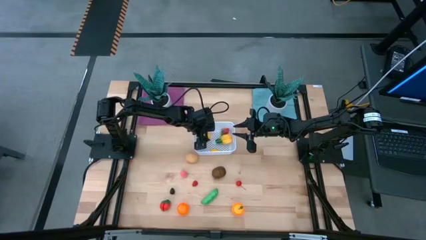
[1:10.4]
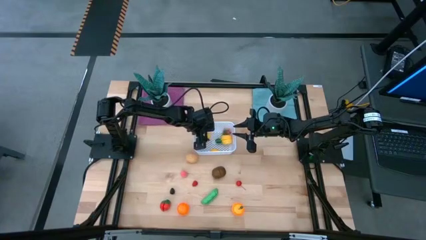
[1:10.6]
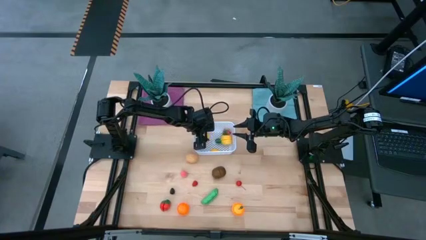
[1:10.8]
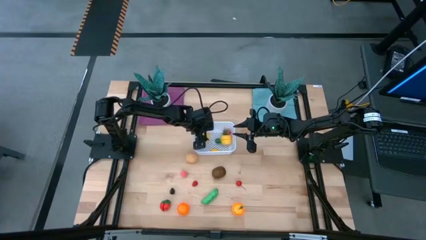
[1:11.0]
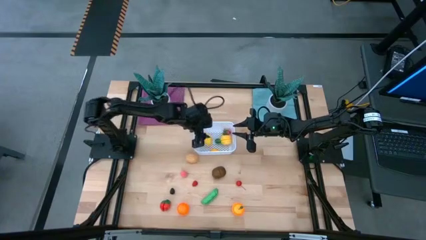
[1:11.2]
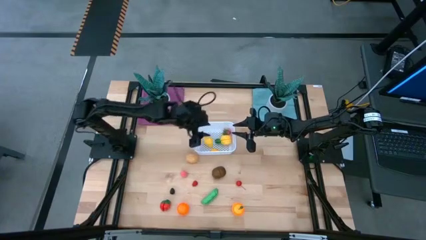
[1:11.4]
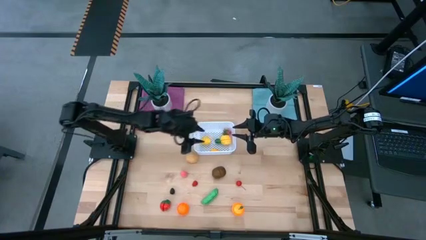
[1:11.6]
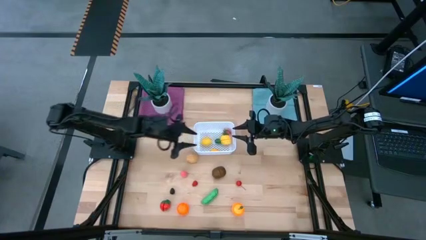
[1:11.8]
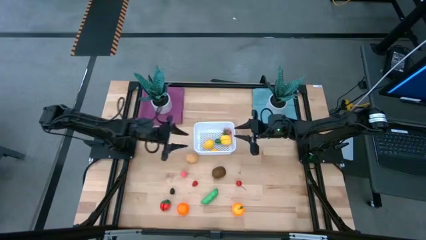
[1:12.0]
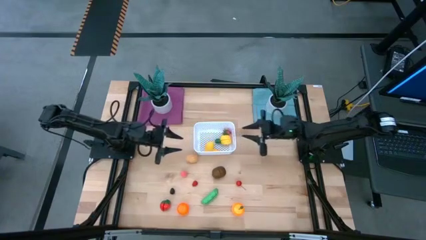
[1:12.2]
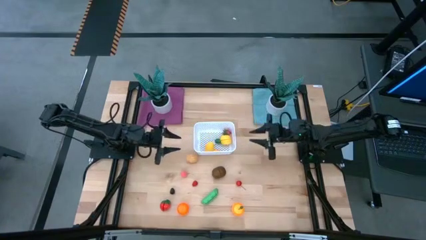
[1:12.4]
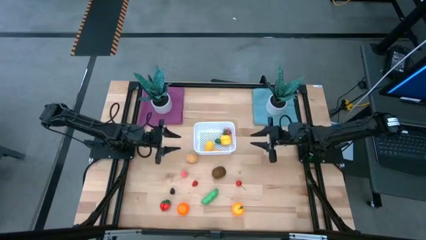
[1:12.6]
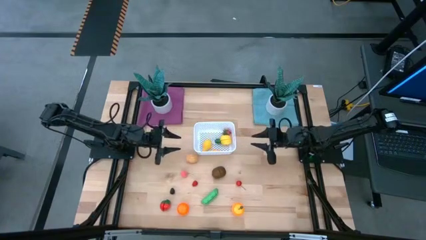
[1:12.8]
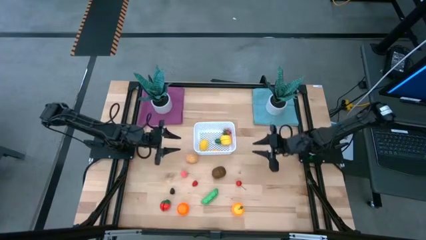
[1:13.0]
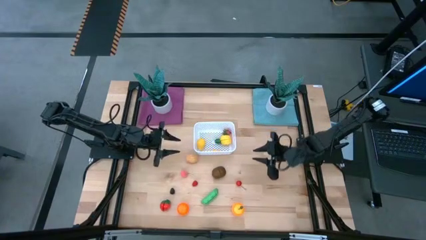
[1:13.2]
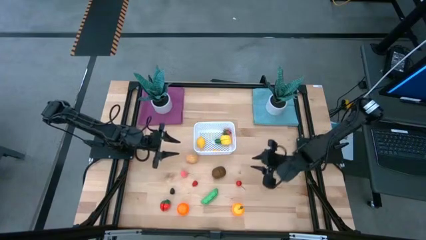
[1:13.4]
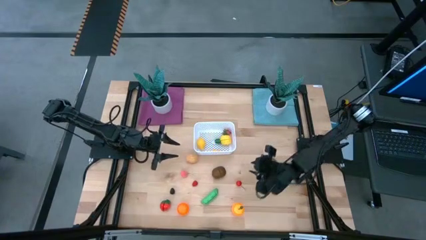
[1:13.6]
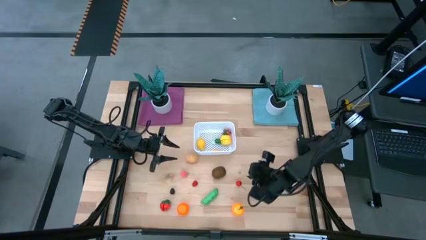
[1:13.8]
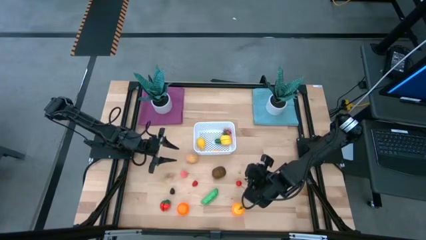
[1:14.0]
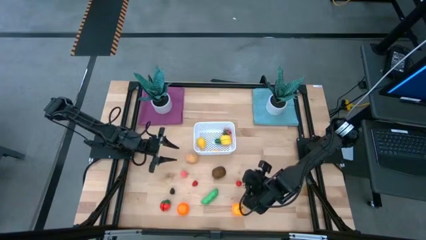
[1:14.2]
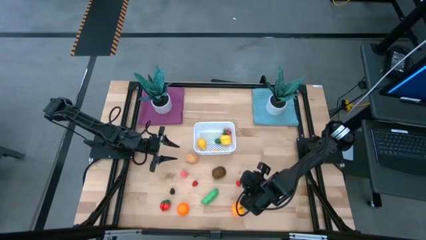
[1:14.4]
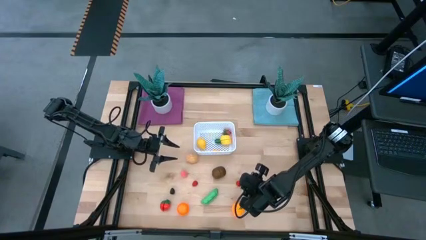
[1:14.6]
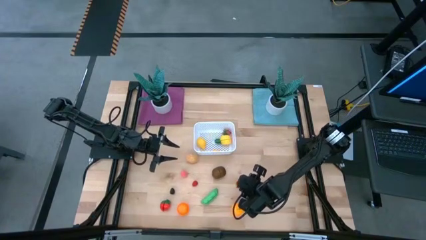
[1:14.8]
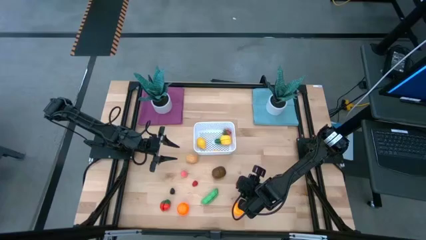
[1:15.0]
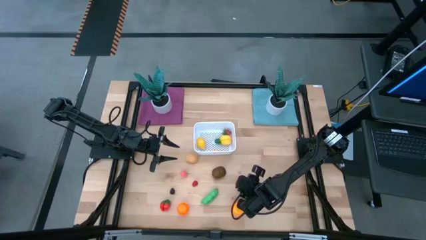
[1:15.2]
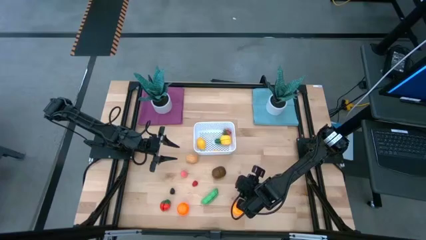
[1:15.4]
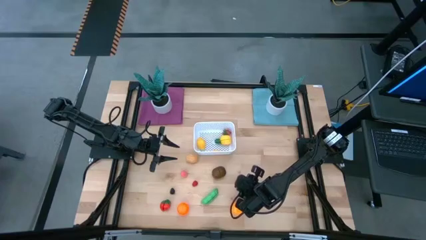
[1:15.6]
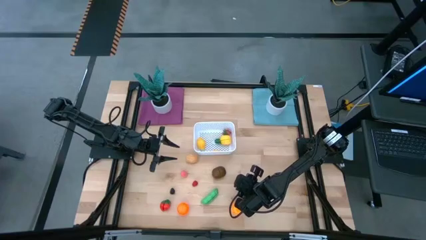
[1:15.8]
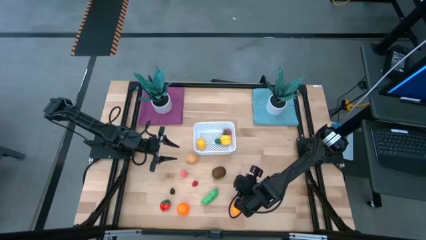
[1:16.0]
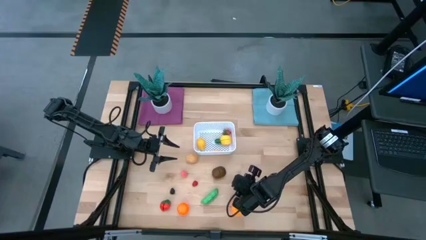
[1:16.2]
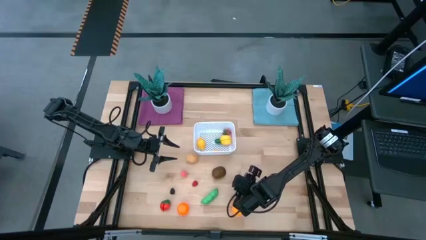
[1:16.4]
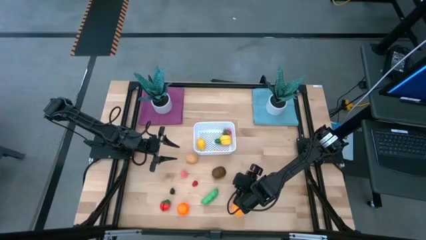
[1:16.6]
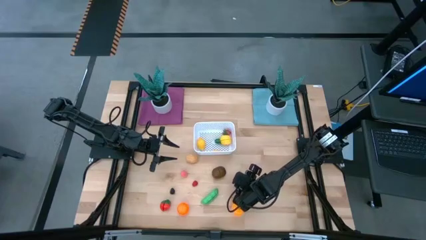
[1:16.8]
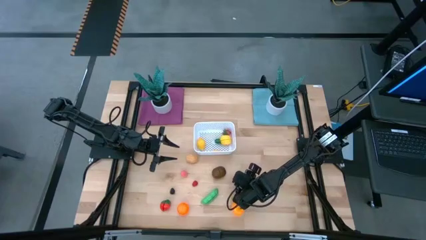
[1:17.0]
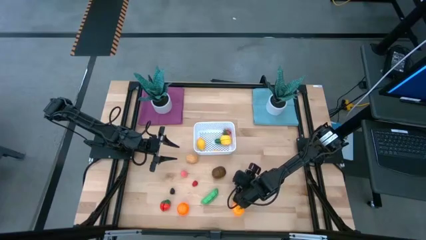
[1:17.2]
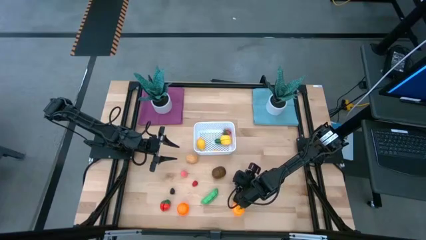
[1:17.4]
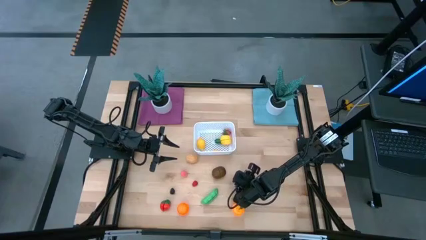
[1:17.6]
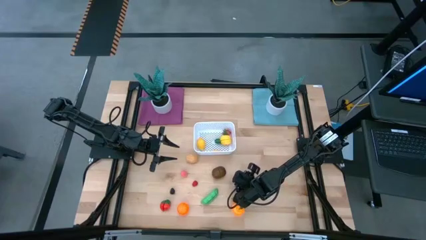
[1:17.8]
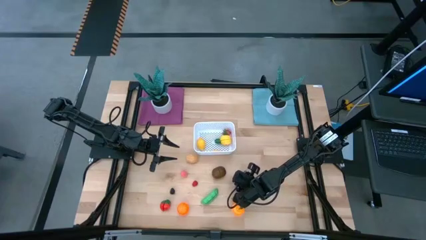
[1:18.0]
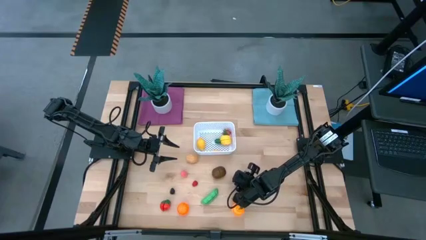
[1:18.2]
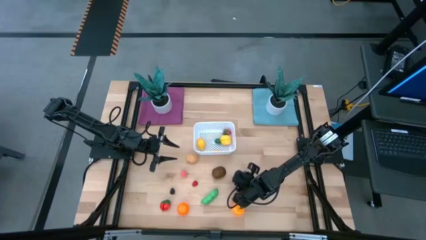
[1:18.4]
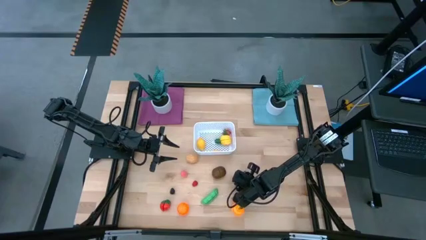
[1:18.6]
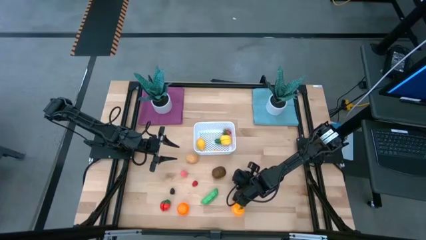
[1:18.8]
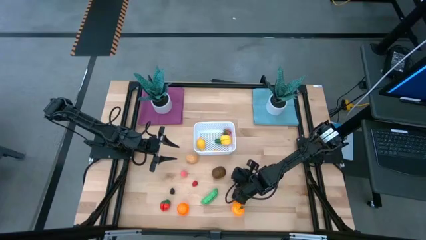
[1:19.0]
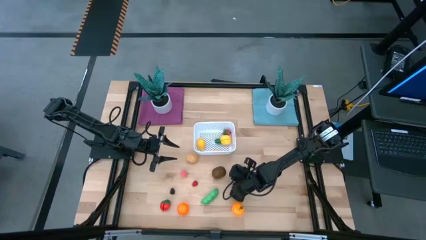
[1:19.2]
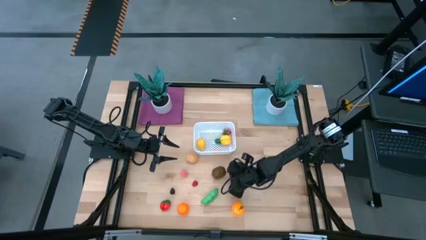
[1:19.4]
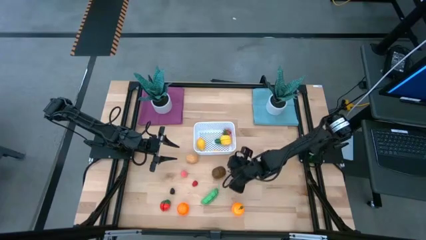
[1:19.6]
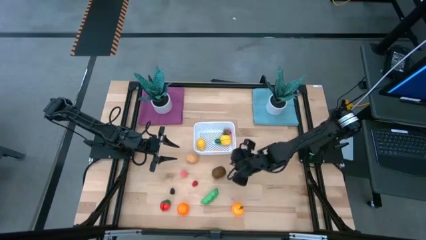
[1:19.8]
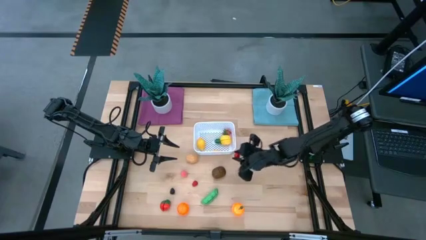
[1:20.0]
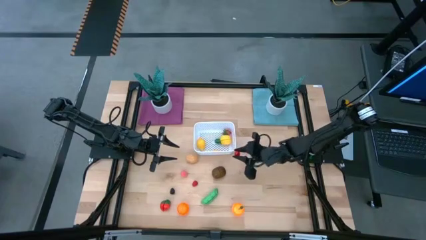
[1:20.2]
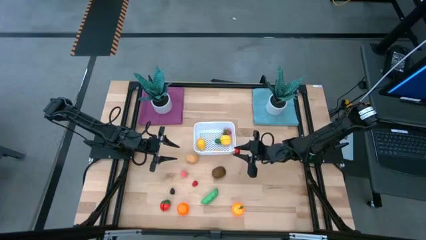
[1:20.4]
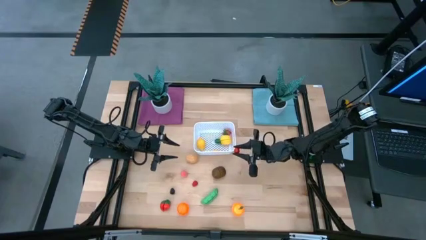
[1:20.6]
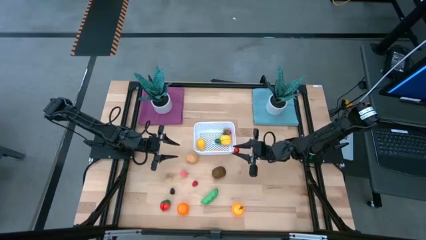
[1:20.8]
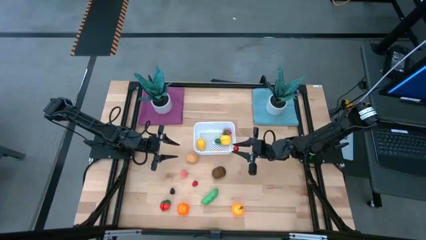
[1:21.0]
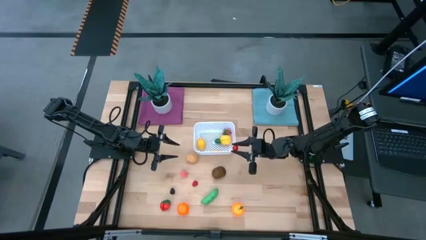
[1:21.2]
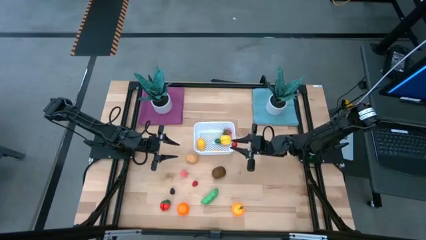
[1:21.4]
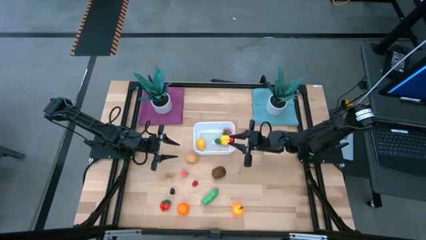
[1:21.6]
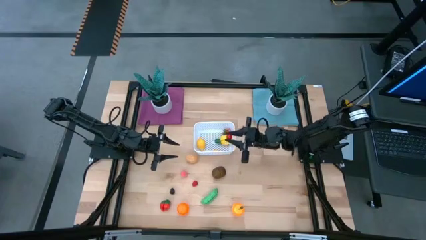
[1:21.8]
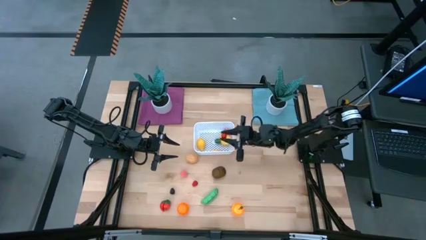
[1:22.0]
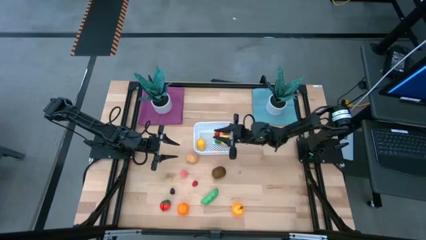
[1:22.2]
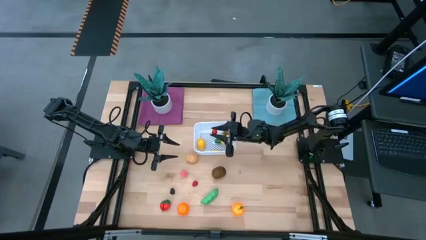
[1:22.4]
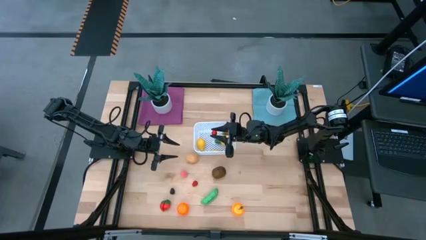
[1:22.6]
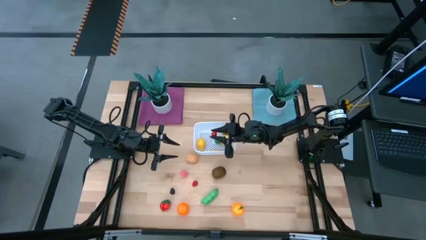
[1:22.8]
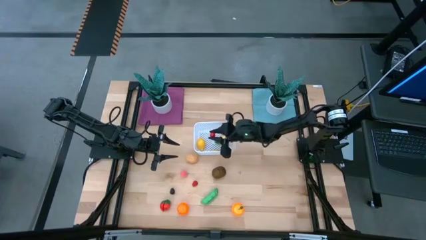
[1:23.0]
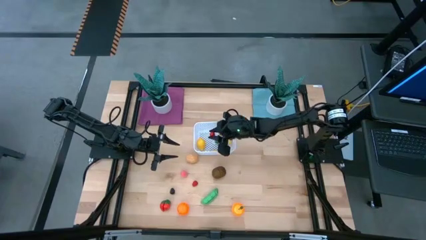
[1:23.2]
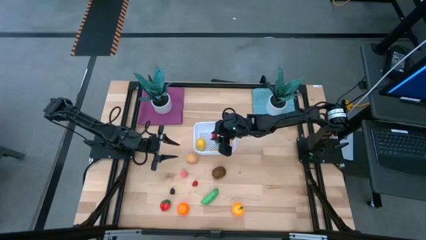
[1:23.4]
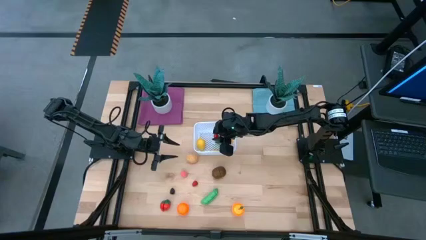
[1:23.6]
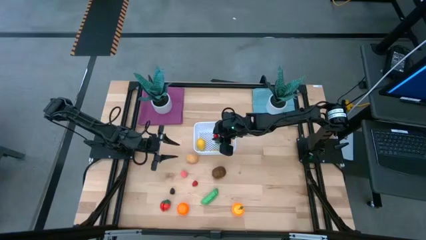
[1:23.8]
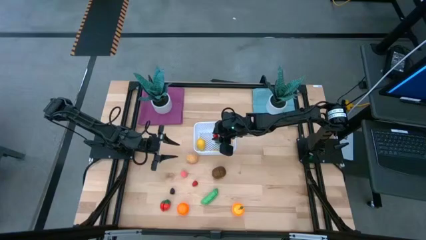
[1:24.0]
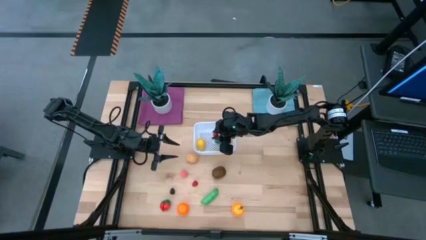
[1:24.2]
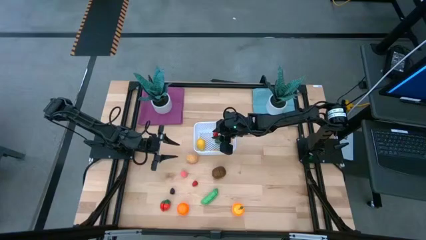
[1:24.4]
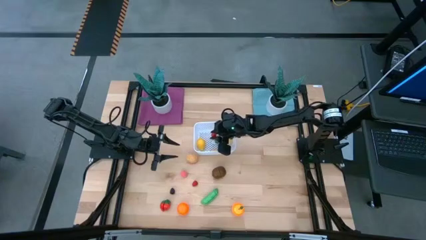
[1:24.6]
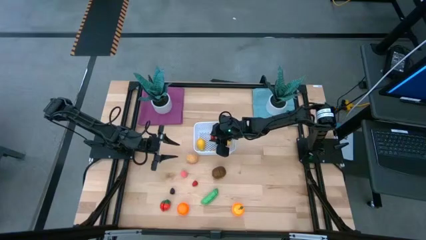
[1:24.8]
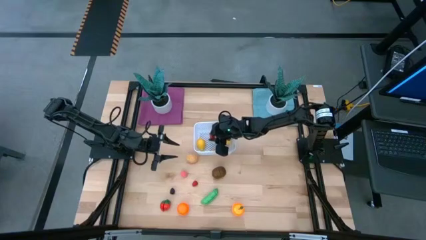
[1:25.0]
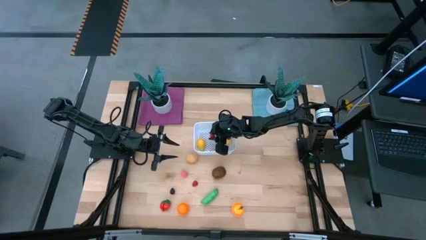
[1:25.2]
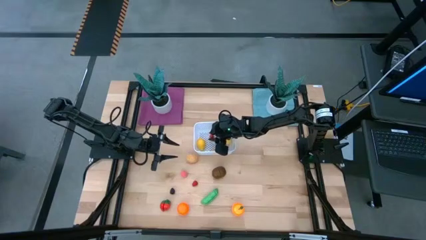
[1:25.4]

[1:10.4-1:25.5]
Task: Pick and placing Produce into tupperware
Put the red cherry into the white bin
